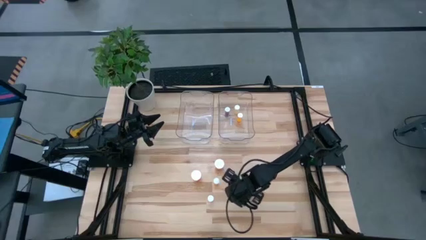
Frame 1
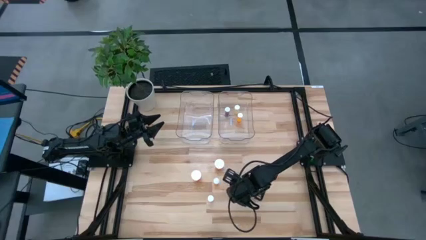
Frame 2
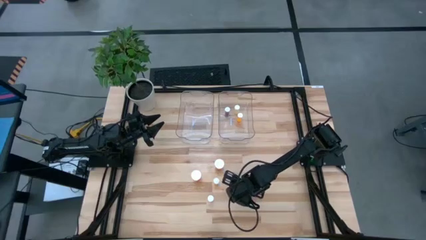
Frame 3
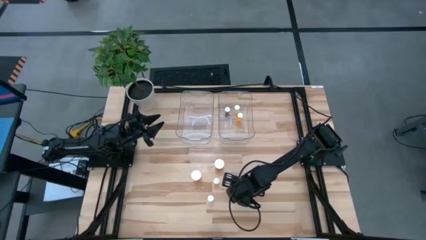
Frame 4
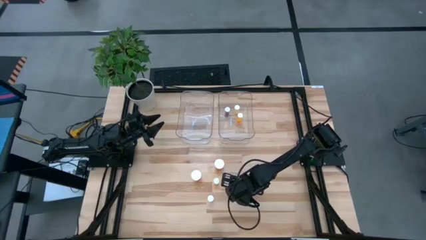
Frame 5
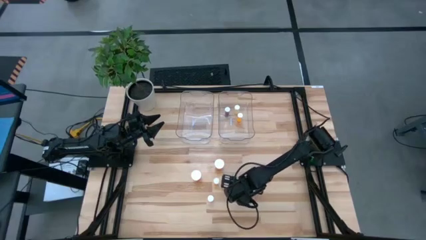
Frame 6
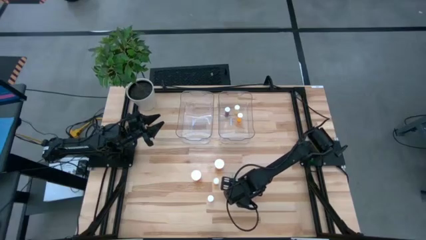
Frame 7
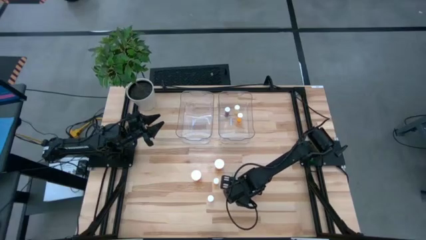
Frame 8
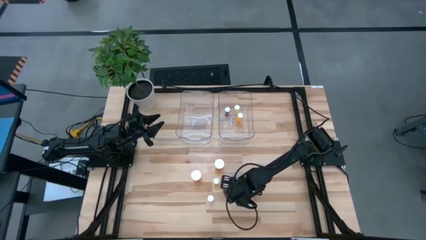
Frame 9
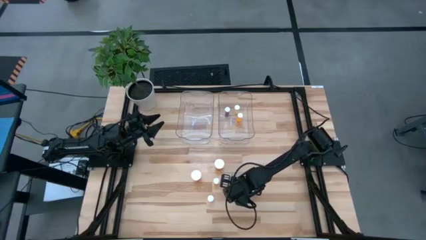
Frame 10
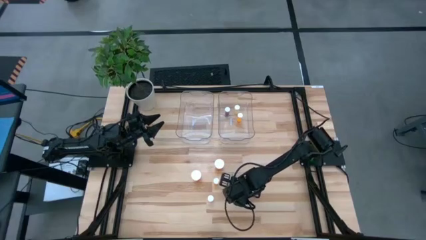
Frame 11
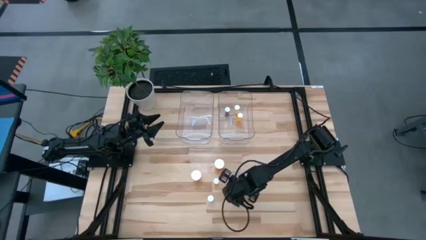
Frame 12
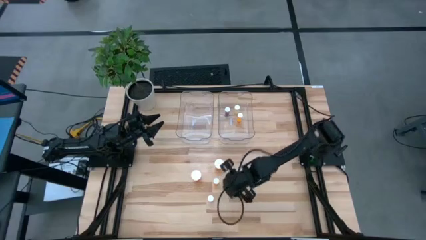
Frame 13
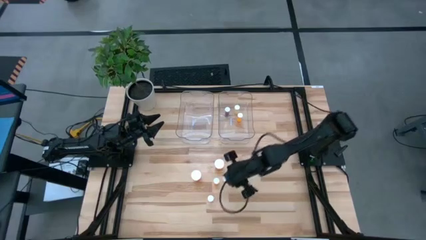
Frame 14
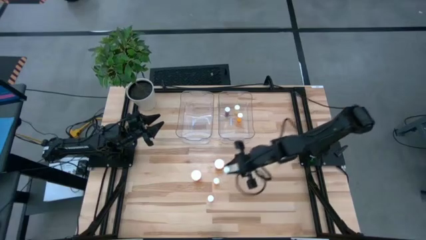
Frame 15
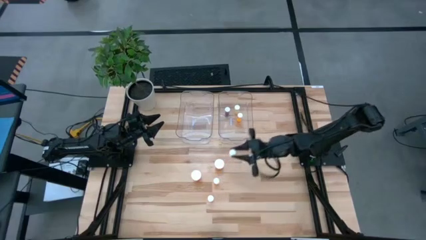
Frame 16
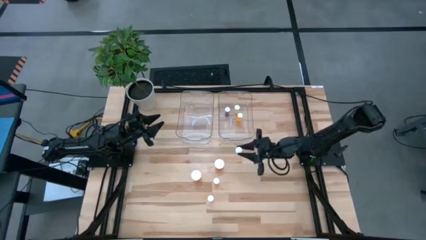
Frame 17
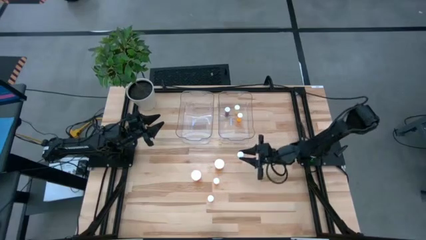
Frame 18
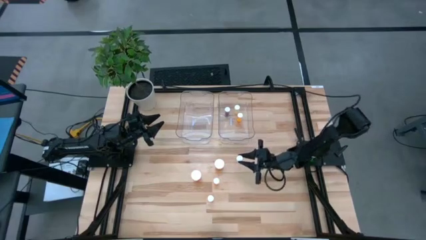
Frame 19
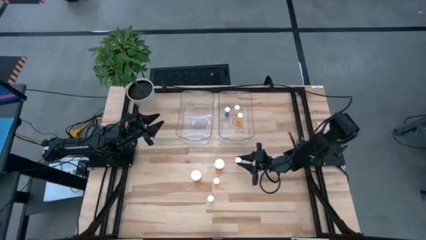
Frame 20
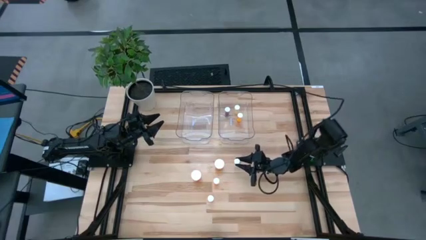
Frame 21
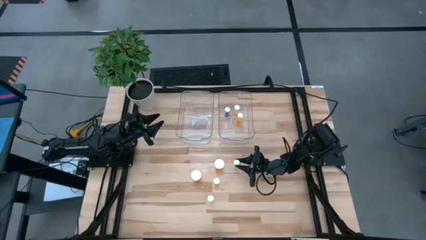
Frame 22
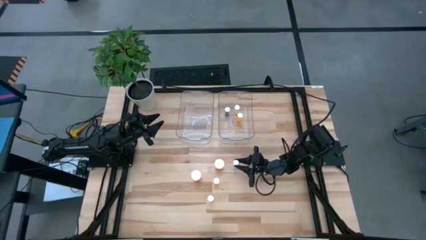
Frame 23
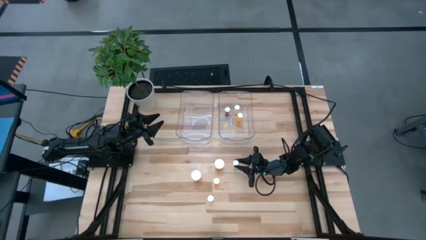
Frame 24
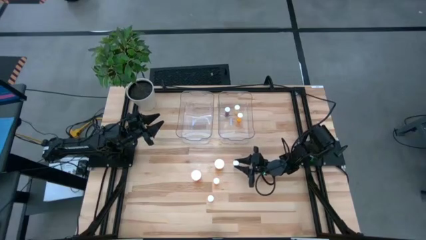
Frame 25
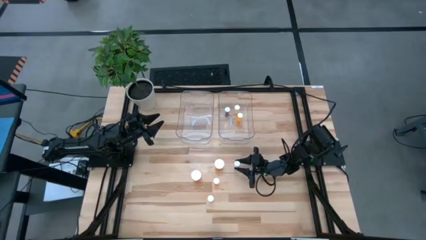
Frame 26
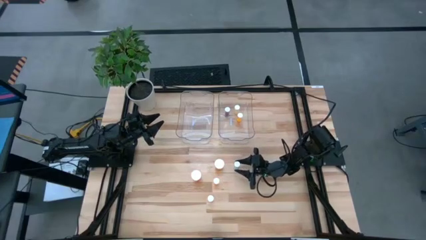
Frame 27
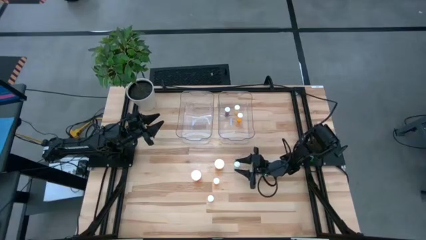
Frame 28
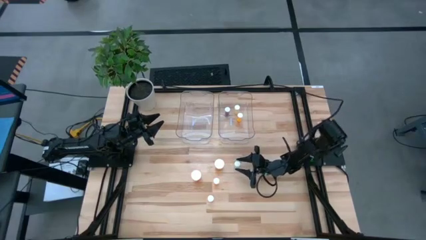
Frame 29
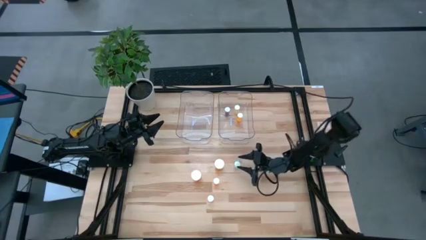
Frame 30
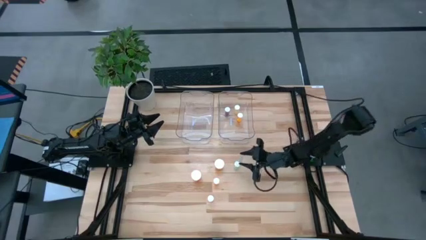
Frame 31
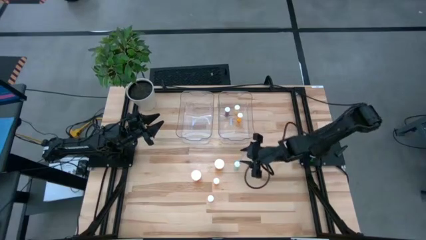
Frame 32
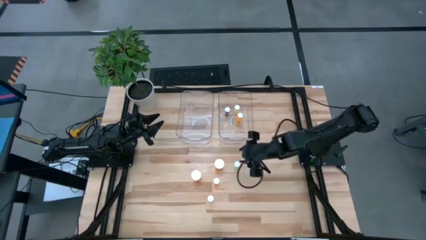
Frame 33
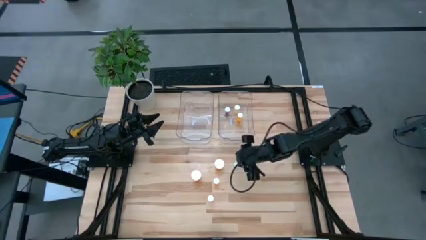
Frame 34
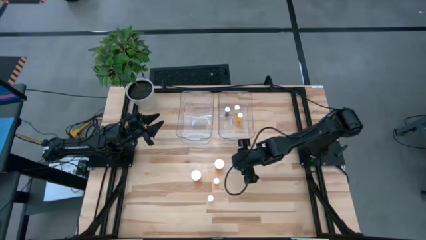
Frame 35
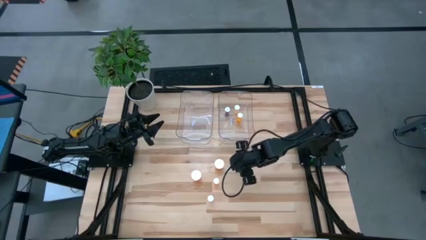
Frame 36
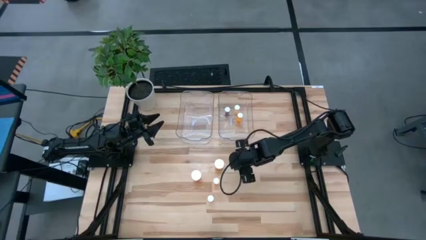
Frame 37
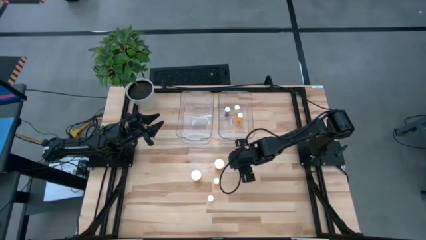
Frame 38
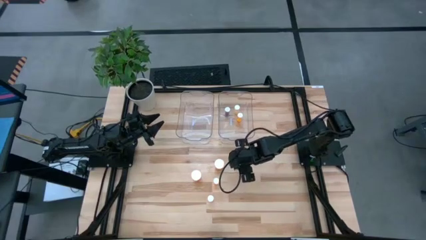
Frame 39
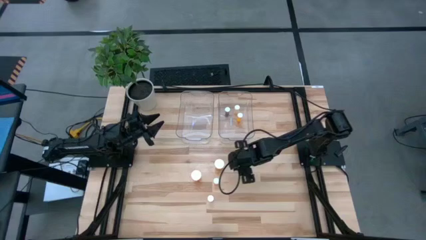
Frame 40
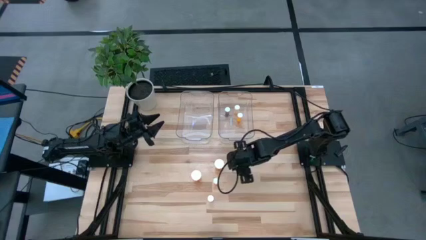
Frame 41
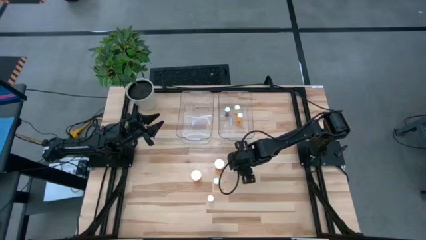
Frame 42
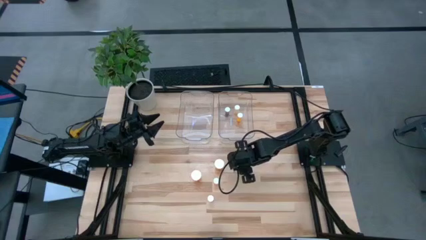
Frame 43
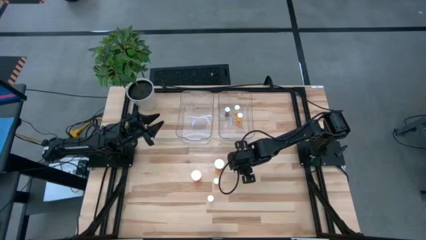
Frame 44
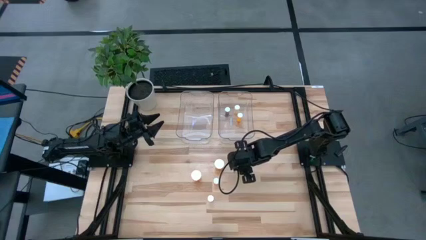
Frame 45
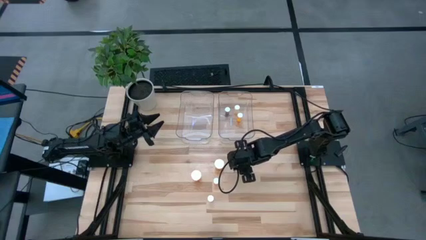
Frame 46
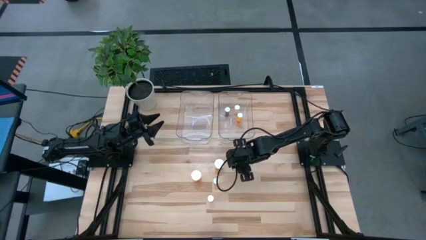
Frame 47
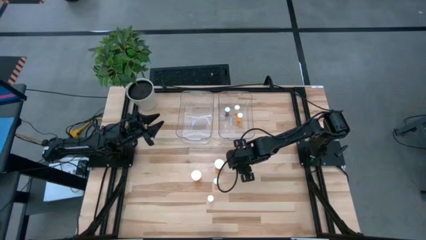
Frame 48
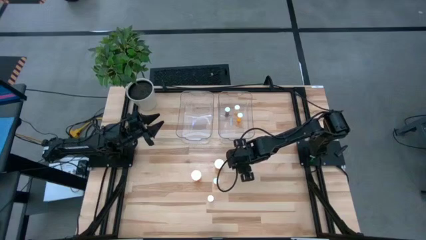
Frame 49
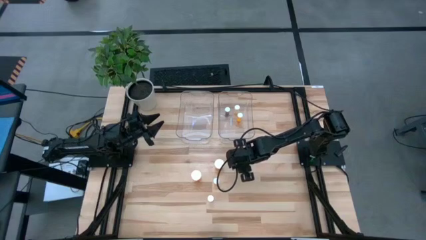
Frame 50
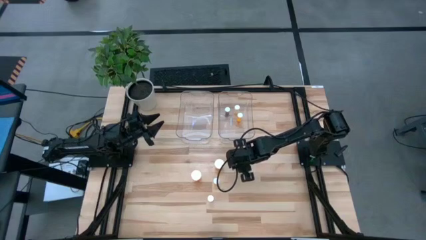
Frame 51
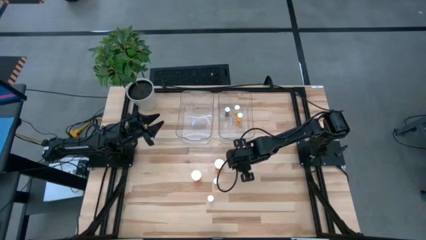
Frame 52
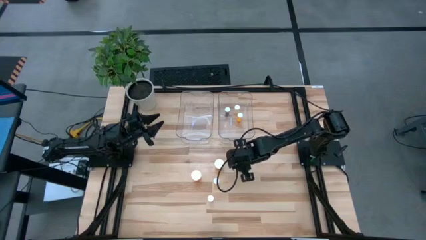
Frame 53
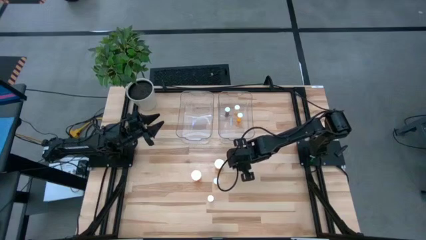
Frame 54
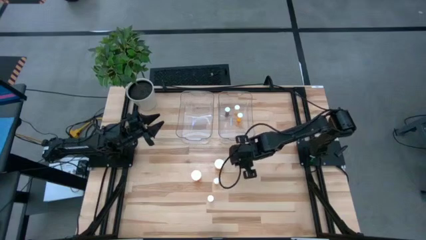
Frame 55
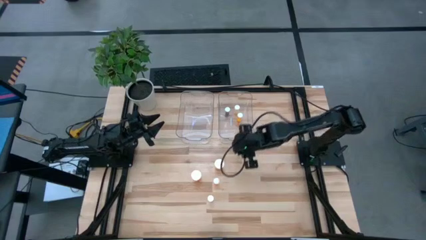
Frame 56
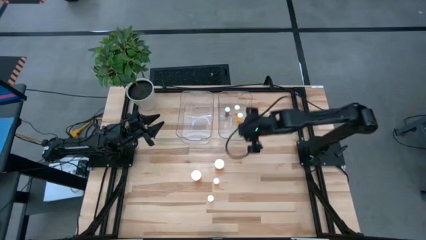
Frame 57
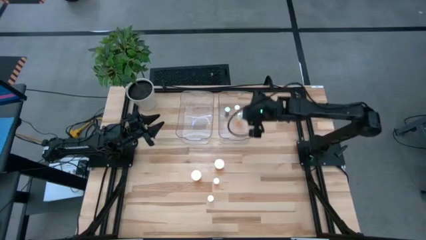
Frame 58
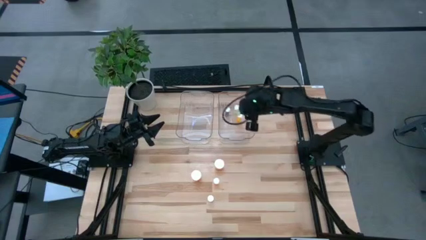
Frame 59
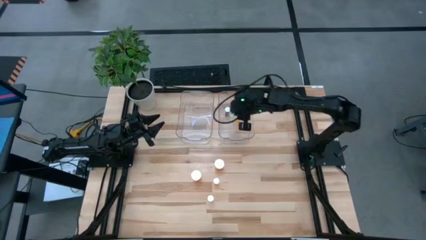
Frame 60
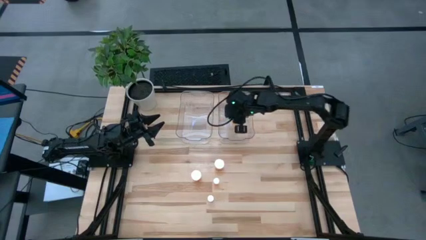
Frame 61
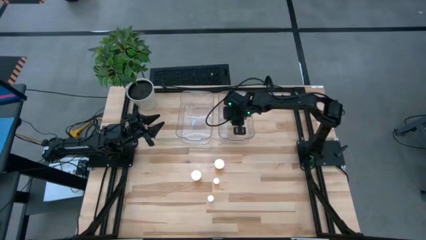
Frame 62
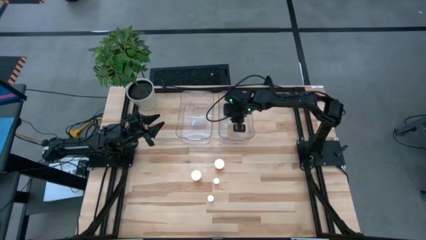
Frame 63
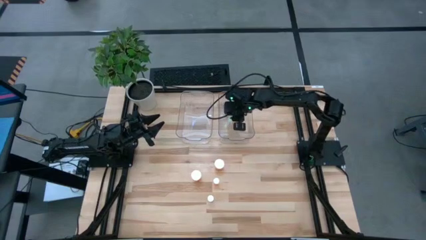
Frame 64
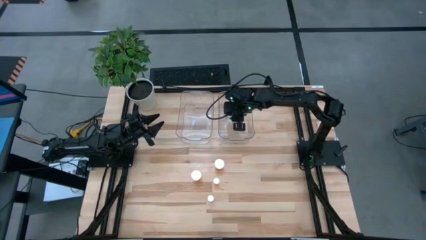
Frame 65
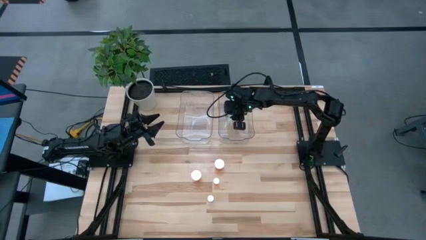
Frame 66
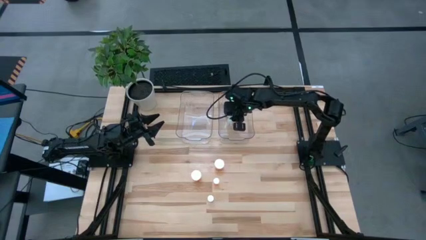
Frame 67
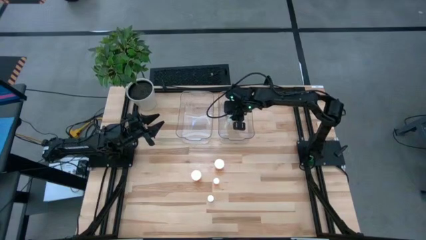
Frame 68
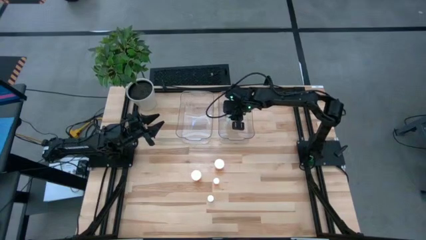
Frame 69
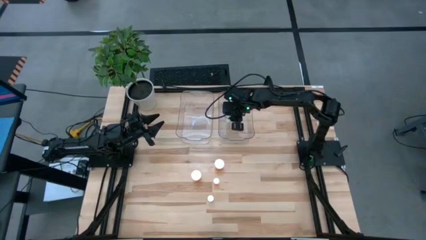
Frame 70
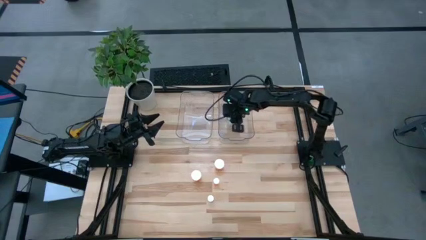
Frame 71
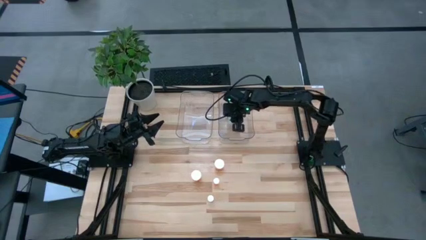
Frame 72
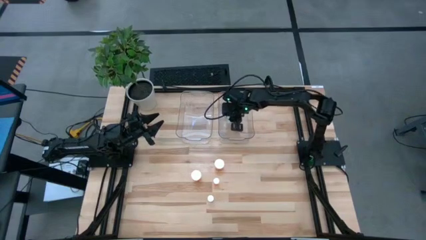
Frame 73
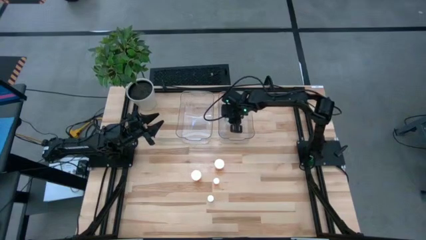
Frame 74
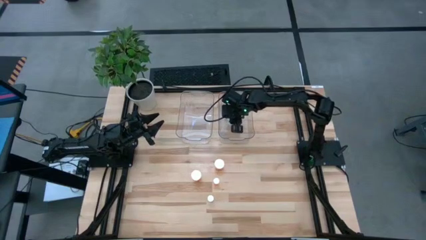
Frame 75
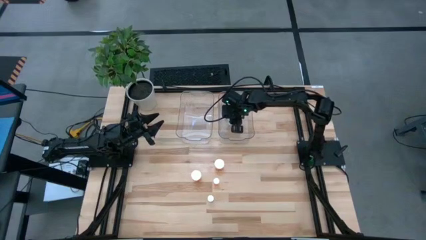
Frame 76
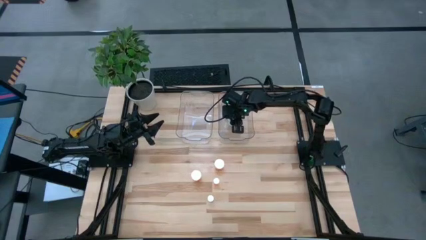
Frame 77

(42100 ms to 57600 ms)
Task: Pick and place medicine bottles into bin by pill shape (circle, oval)
Put the green tablet bottle into the right transparent bin
